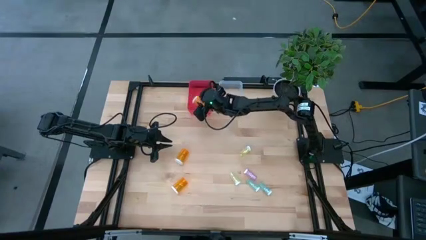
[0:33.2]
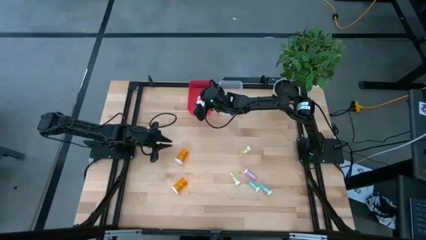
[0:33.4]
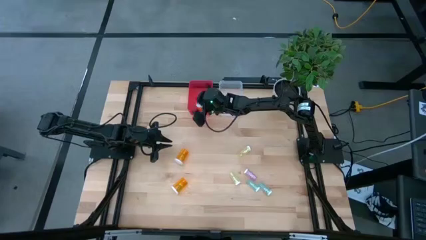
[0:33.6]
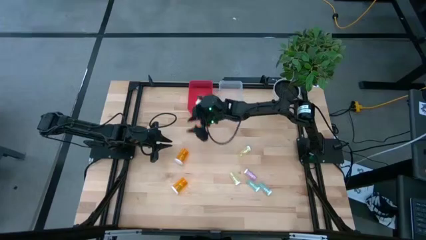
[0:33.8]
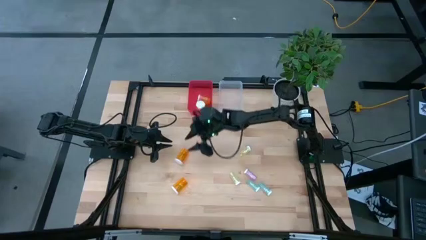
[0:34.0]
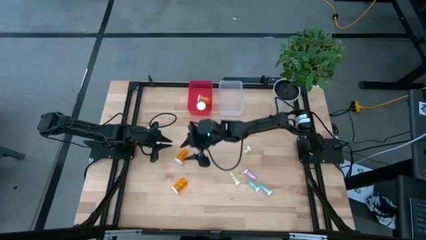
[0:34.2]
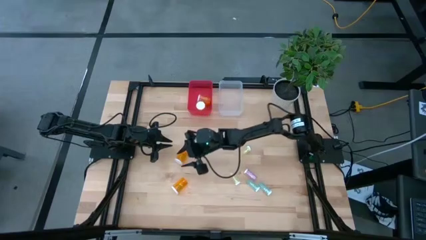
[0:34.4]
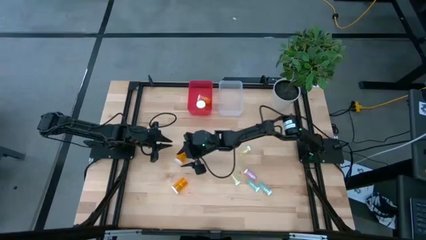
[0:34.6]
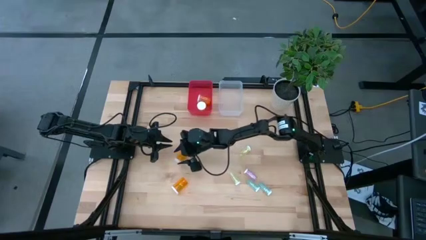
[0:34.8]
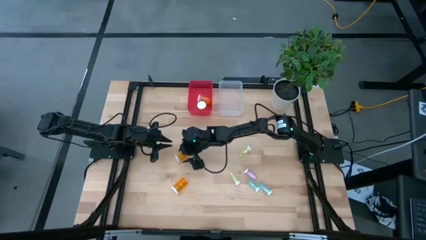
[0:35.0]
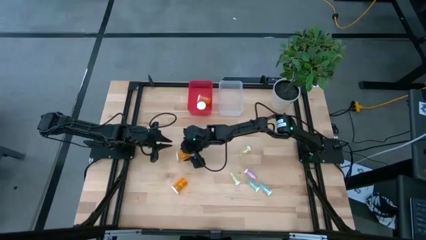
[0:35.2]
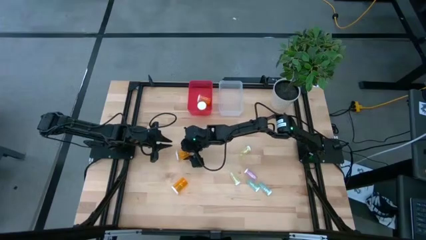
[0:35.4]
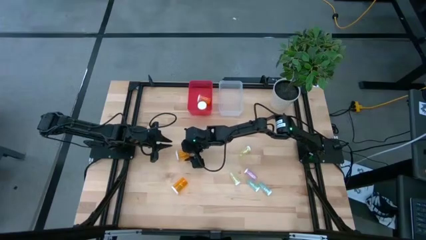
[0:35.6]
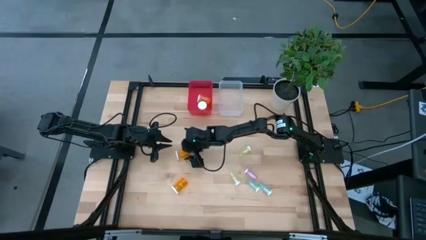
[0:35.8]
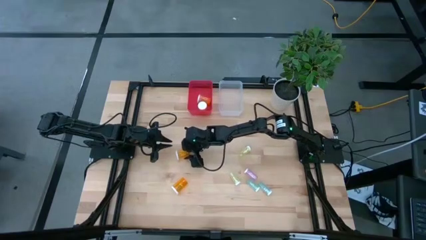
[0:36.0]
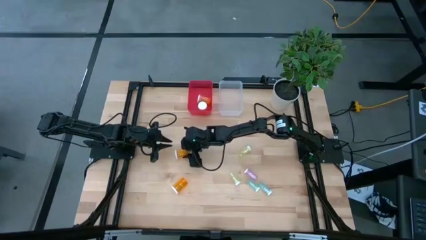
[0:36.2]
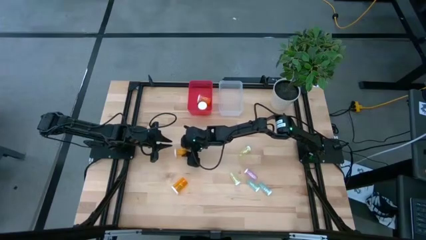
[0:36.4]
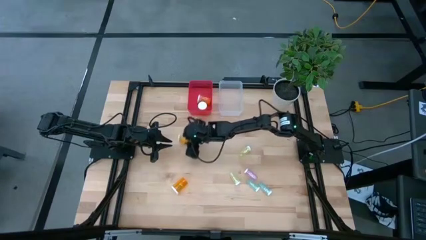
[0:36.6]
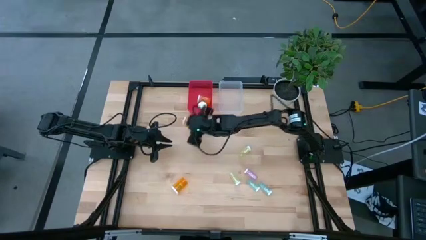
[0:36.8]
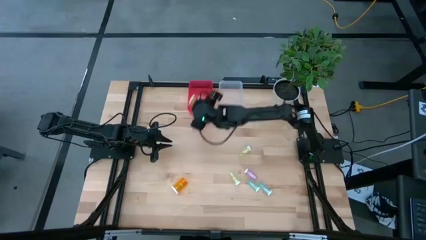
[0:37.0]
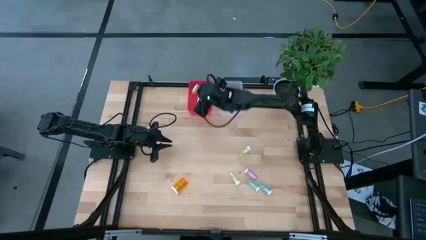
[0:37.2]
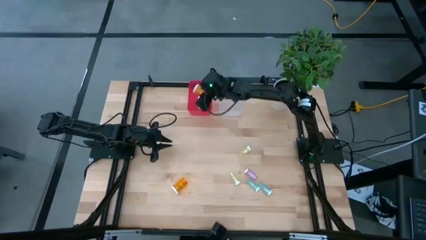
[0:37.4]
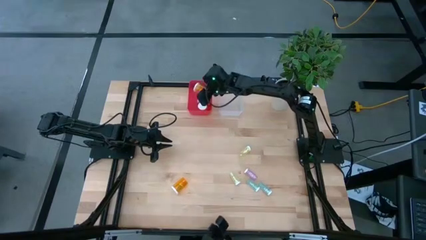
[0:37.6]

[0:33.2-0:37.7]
Task: Pick and place medicine bottles into bin by pill shape (circle, oval)
Put the large orange pill bottle into the red bin

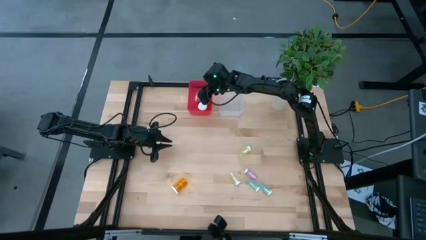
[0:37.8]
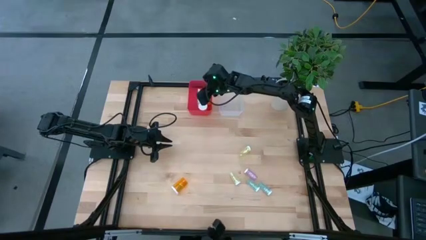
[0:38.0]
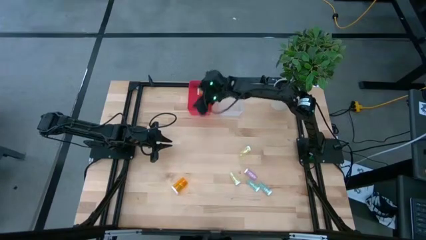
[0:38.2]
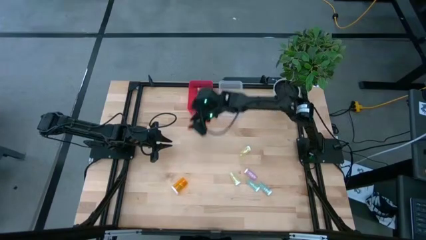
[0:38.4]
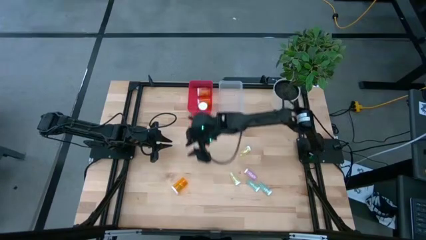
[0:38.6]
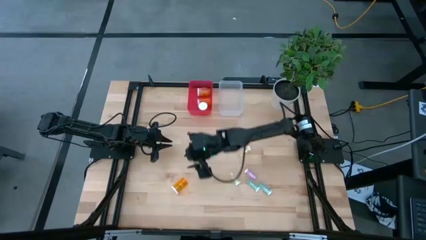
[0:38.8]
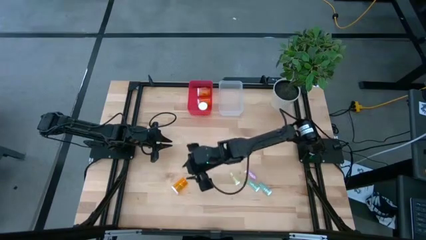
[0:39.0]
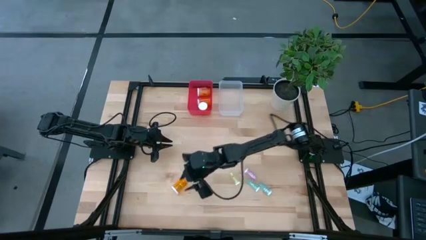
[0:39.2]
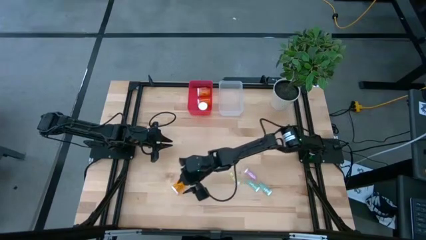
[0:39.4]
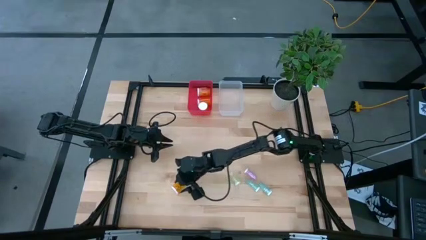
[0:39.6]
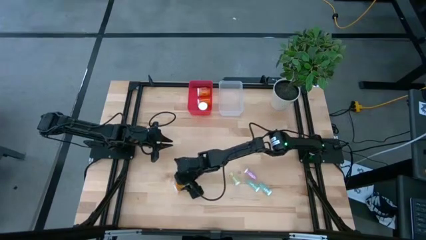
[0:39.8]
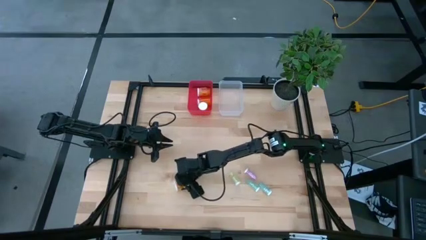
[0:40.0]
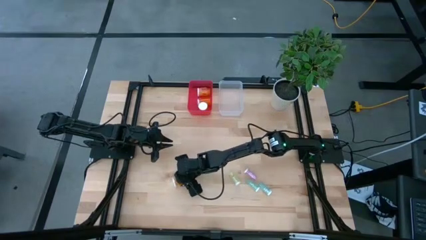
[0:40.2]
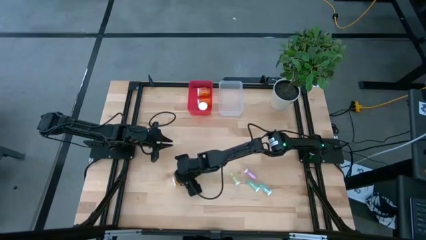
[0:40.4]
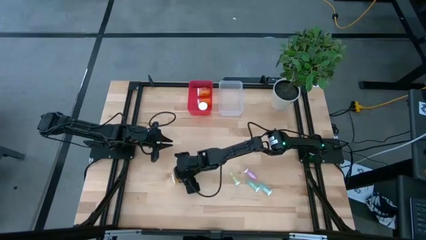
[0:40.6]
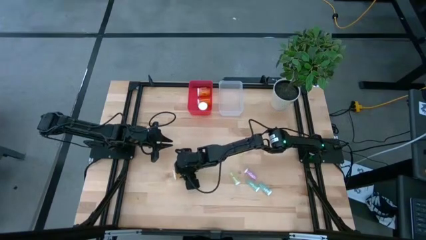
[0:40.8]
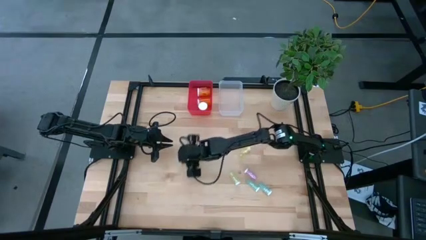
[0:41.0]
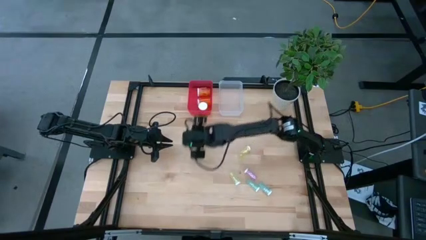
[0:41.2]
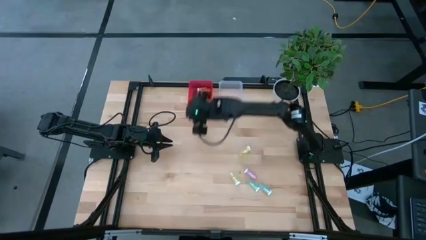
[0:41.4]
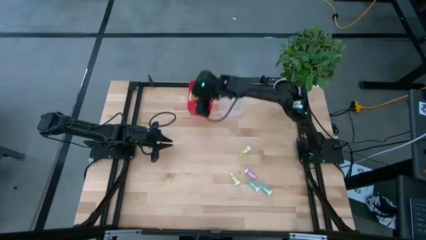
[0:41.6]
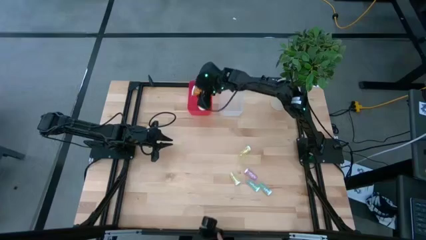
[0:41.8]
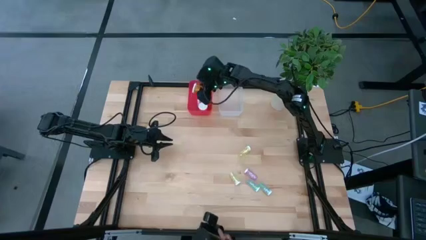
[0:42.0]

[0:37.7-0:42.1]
Put the large orange pill bottle into the red bin

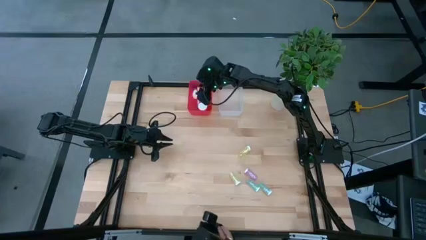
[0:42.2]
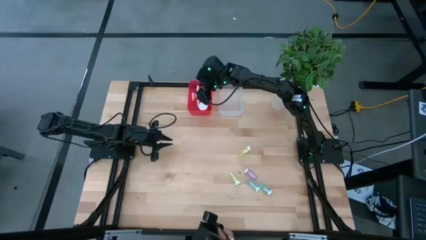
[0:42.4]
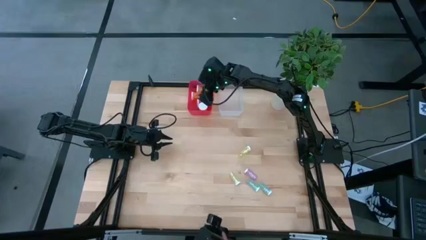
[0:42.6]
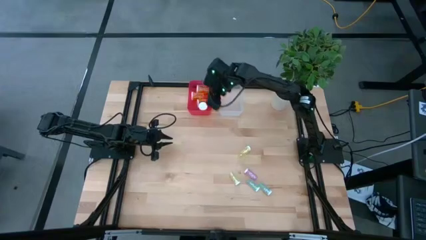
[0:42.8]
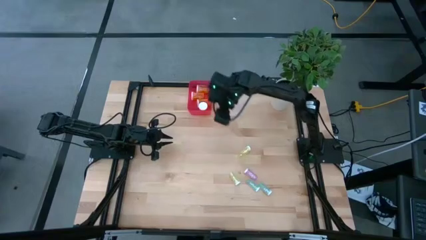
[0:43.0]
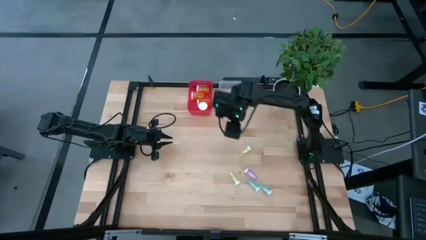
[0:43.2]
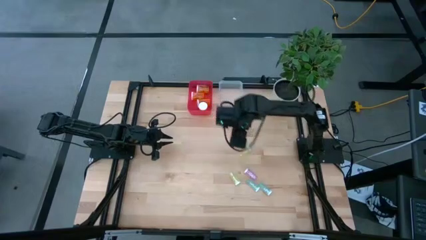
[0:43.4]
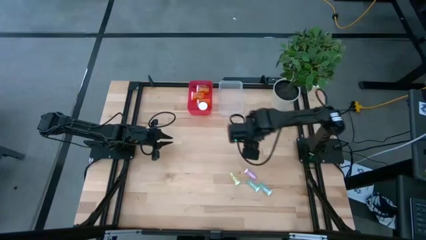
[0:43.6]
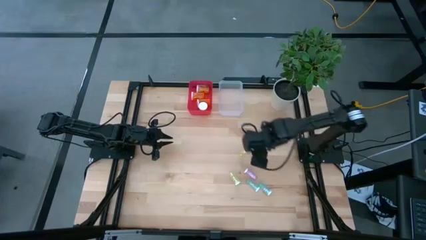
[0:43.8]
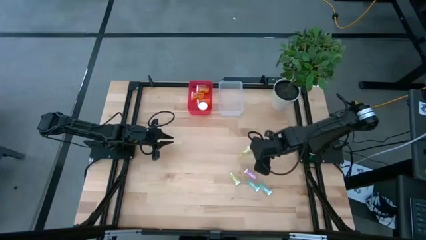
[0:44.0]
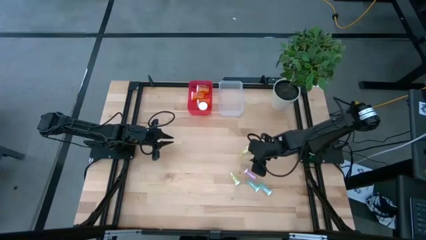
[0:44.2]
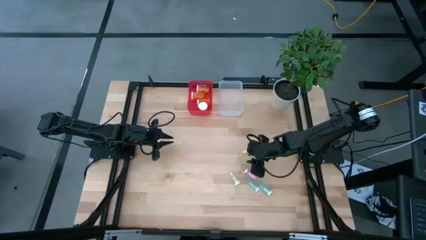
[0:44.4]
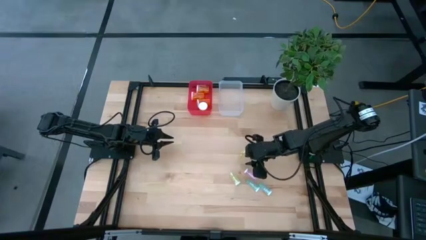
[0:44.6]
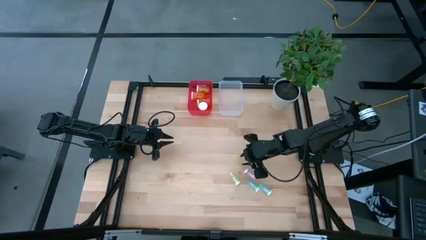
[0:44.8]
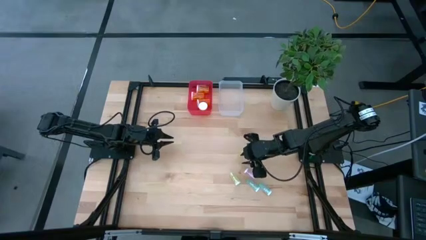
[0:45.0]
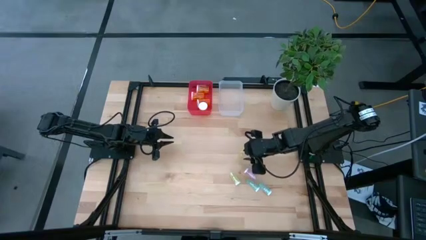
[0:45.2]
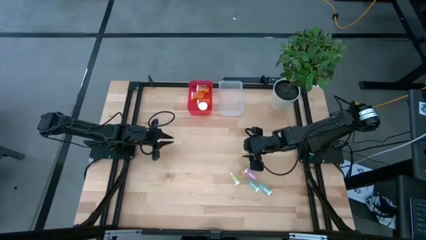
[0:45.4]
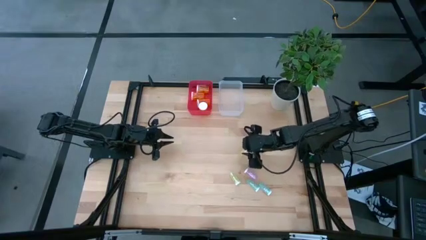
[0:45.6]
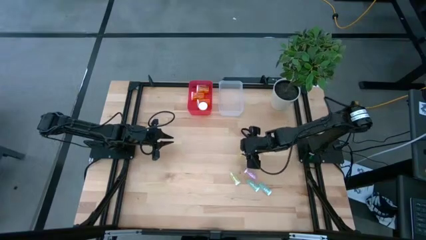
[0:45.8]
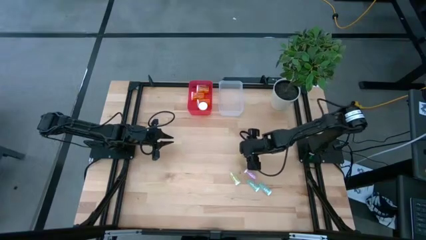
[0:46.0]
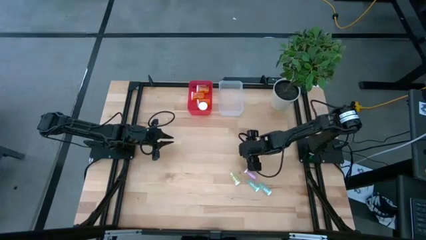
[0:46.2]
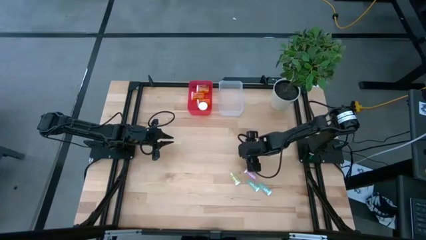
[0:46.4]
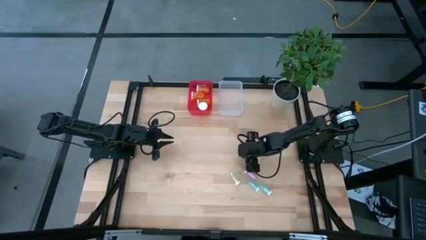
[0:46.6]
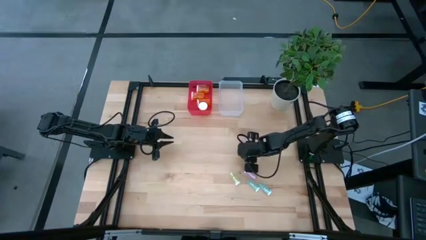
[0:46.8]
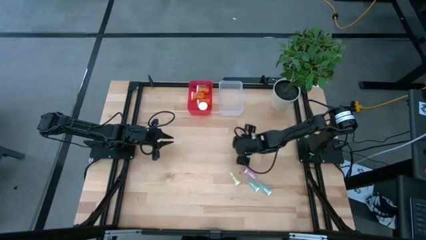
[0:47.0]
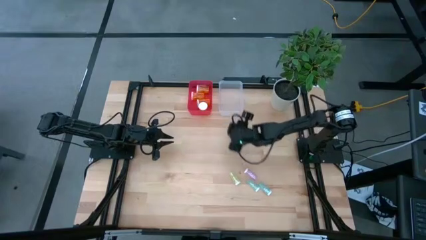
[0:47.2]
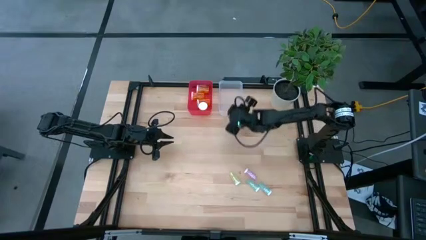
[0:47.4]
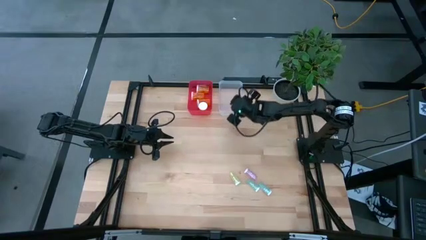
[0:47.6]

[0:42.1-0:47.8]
Put the small yellow pill bottle into the transparent bin

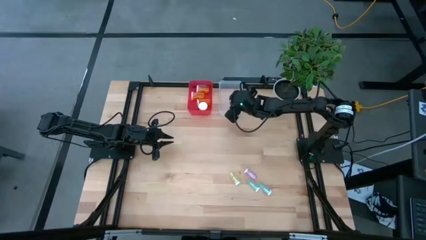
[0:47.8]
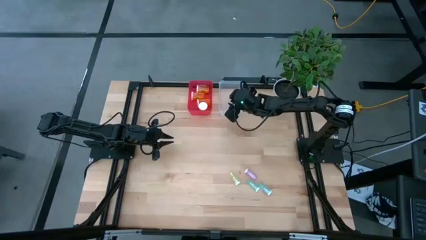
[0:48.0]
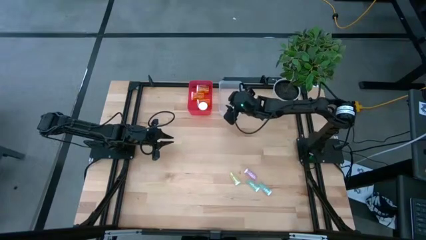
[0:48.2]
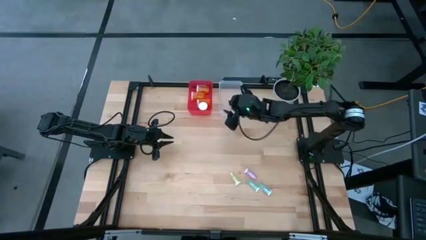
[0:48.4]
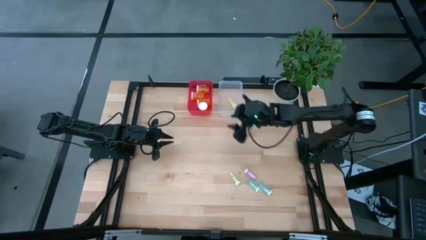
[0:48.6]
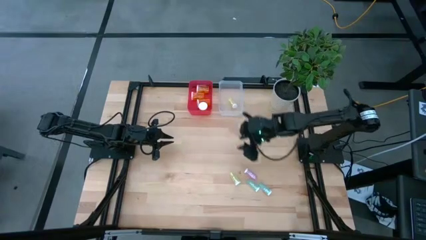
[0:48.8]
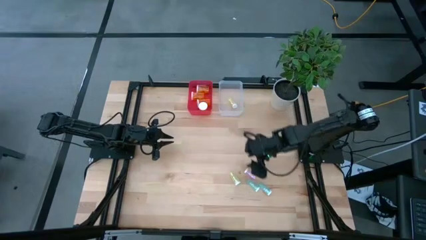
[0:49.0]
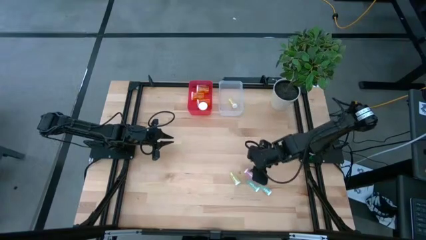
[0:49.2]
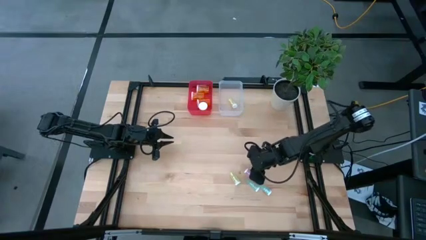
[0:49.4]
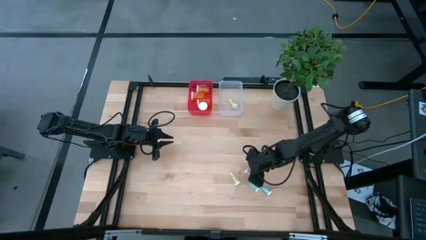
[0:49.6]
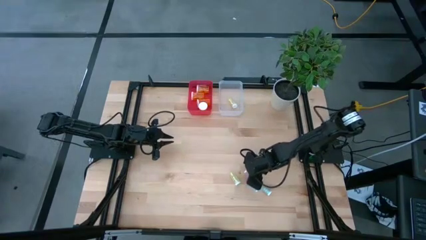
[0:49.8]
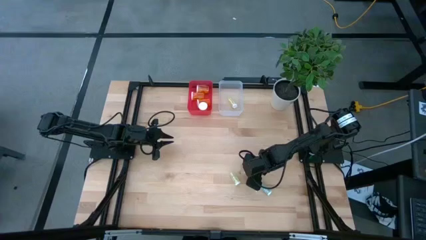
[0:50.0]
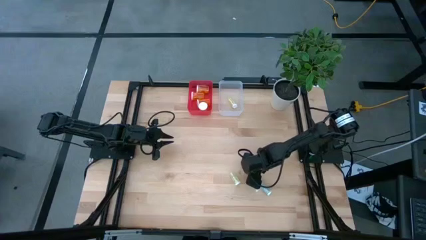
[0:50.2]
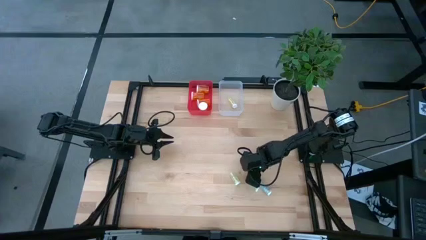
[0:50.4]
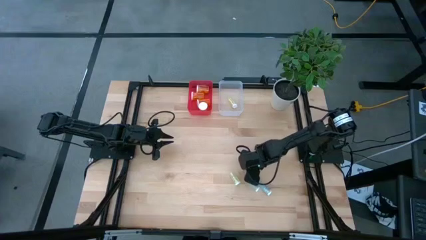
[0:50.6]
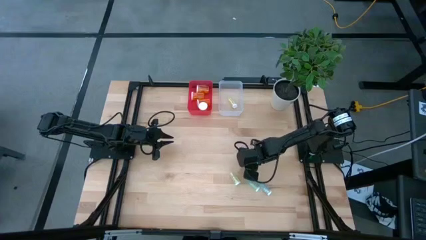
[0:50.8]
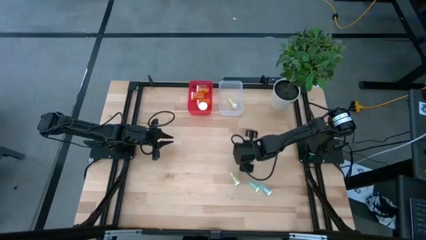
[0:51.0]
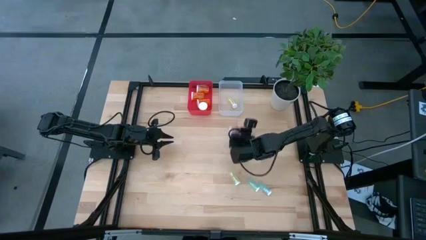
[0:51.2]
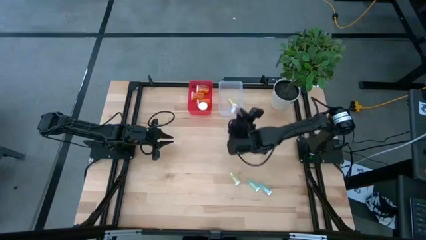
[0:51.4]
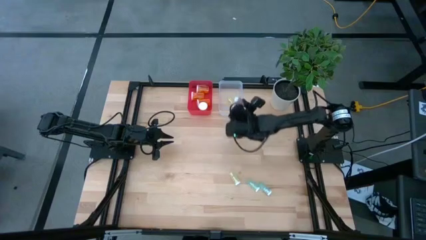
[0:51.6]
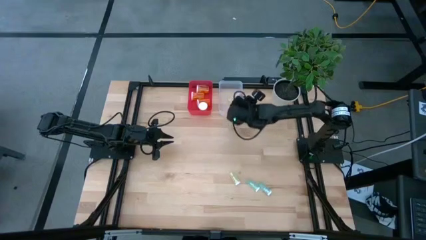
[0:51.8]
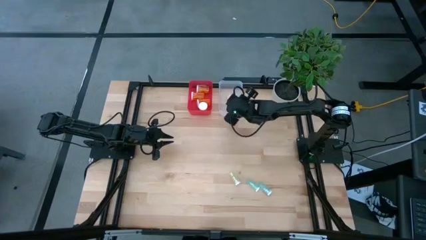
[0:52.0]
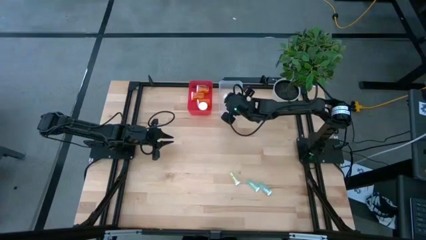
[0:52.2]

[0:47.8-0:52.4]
Put the small purple pill bottle into the transparent bin
